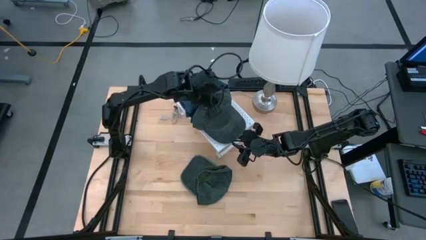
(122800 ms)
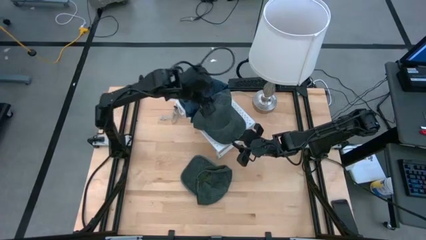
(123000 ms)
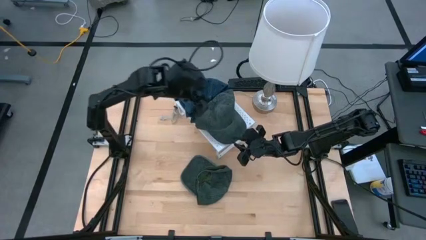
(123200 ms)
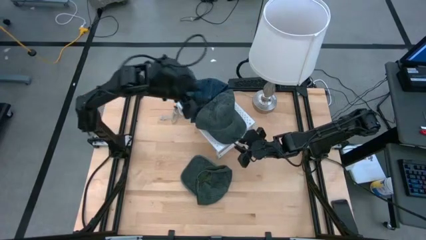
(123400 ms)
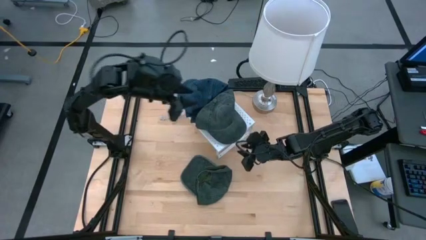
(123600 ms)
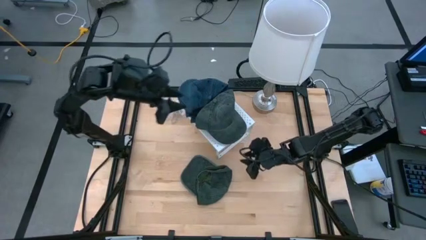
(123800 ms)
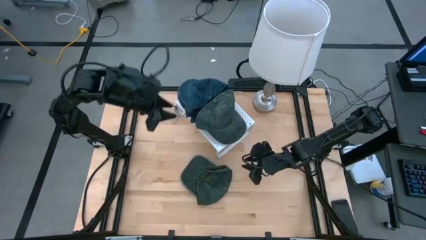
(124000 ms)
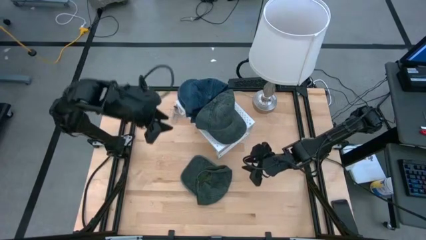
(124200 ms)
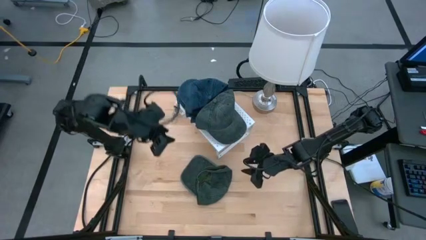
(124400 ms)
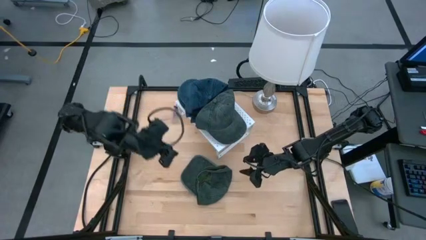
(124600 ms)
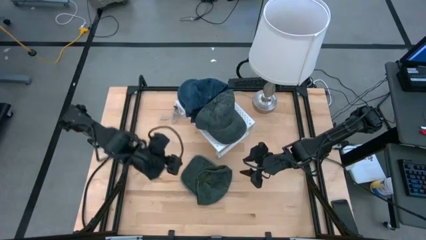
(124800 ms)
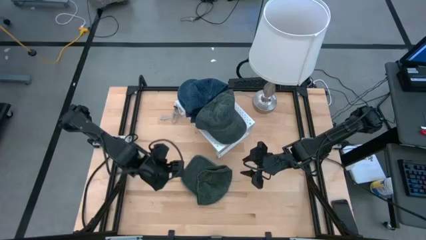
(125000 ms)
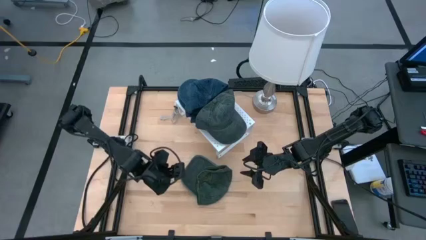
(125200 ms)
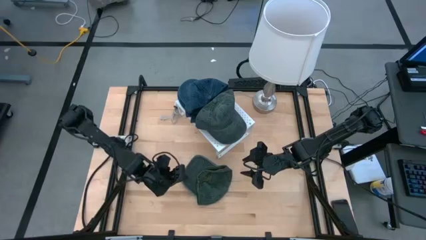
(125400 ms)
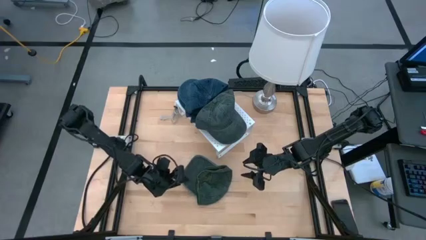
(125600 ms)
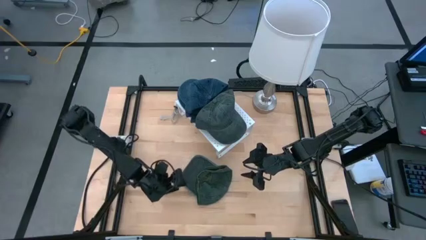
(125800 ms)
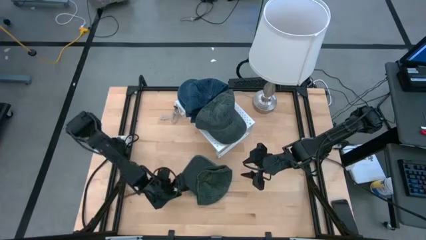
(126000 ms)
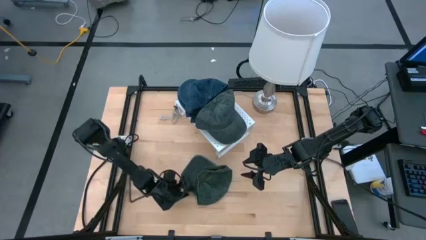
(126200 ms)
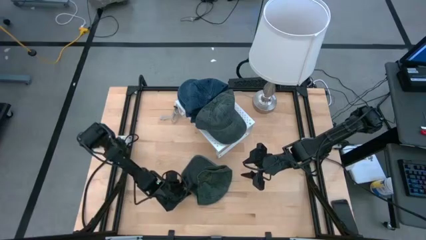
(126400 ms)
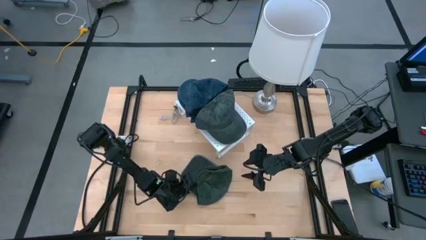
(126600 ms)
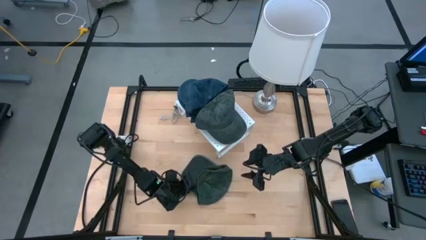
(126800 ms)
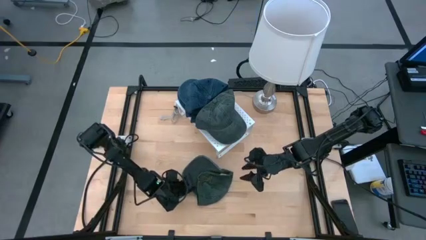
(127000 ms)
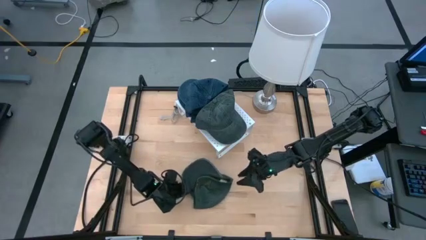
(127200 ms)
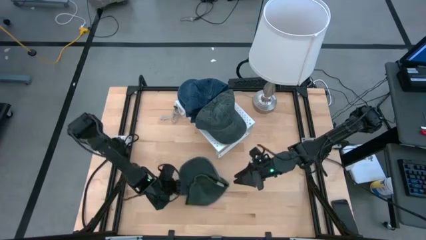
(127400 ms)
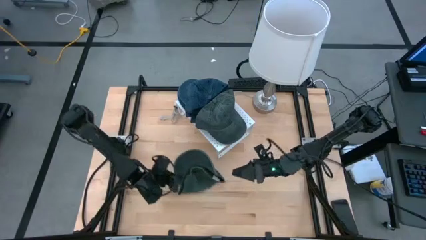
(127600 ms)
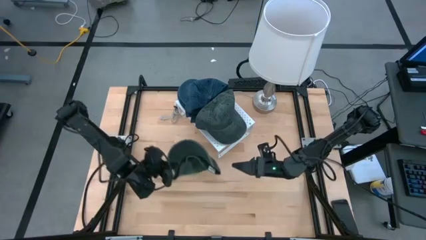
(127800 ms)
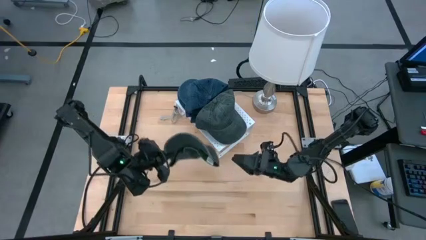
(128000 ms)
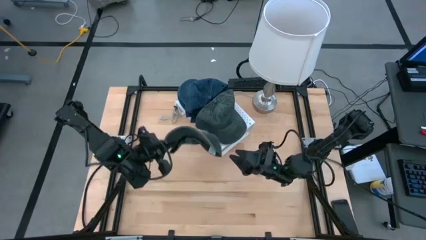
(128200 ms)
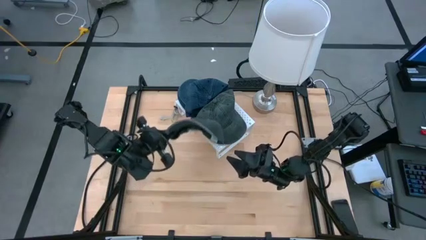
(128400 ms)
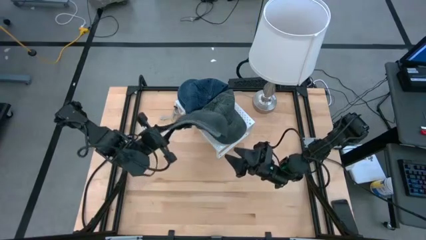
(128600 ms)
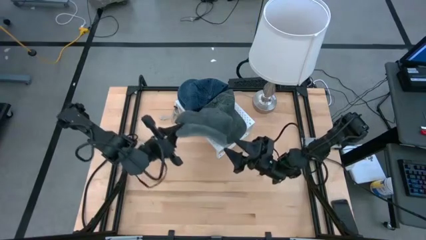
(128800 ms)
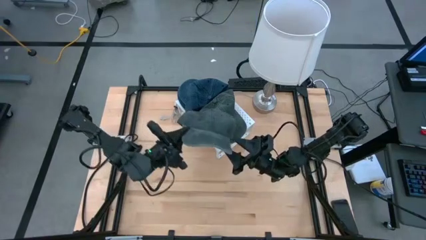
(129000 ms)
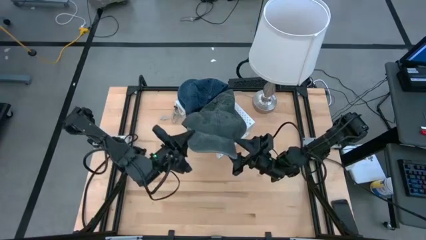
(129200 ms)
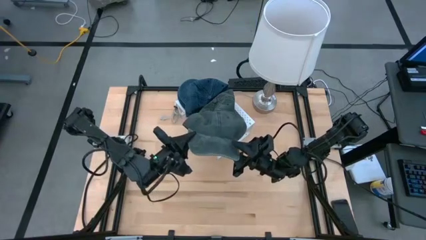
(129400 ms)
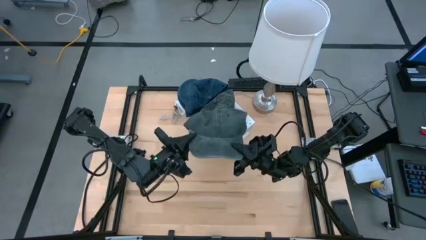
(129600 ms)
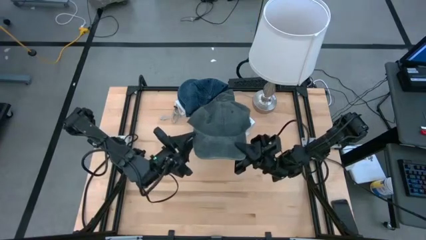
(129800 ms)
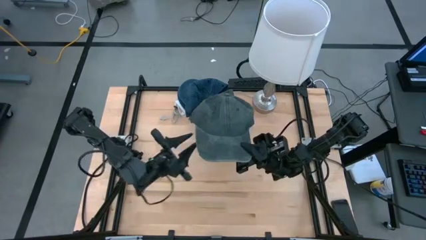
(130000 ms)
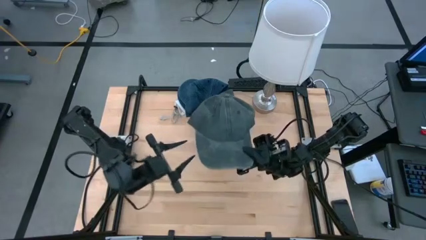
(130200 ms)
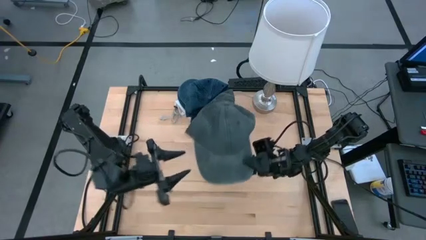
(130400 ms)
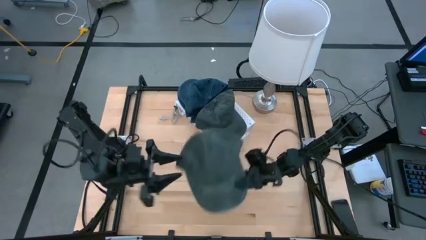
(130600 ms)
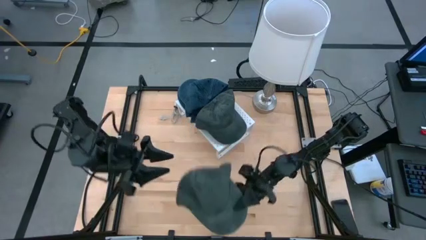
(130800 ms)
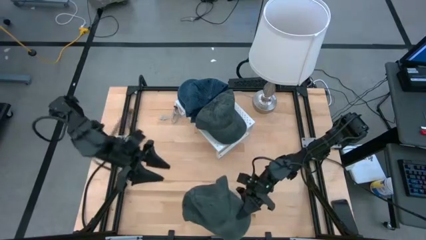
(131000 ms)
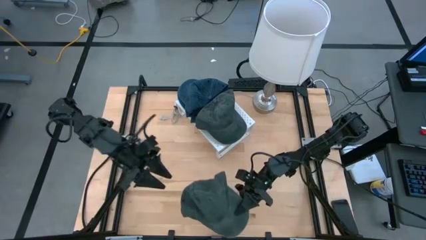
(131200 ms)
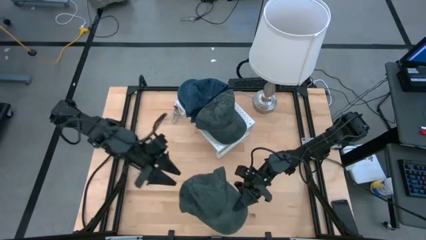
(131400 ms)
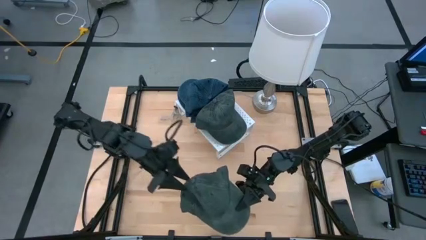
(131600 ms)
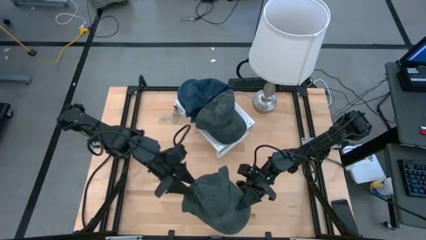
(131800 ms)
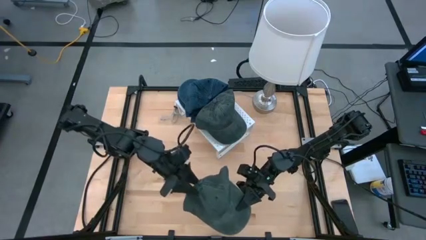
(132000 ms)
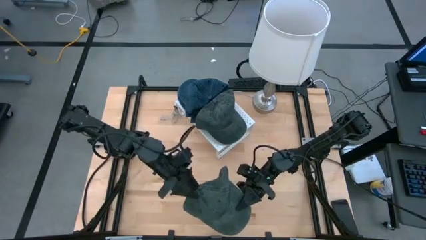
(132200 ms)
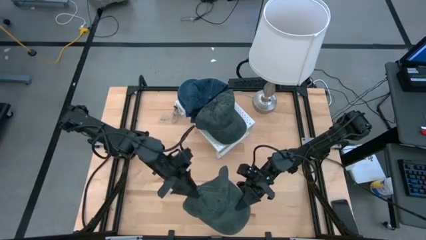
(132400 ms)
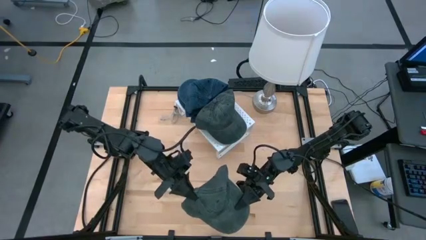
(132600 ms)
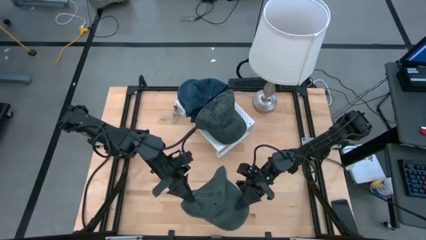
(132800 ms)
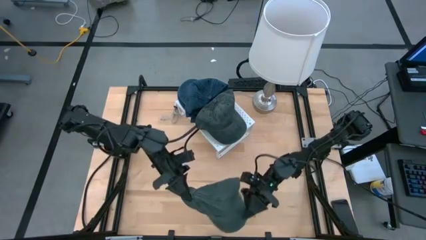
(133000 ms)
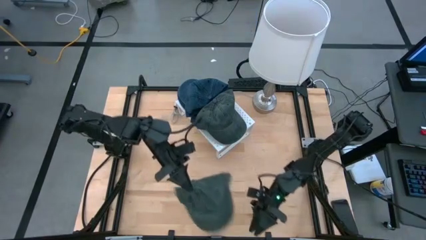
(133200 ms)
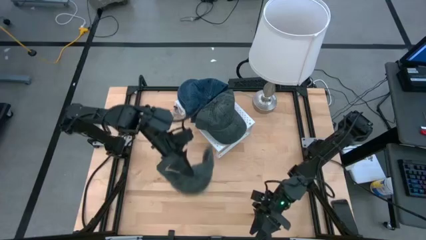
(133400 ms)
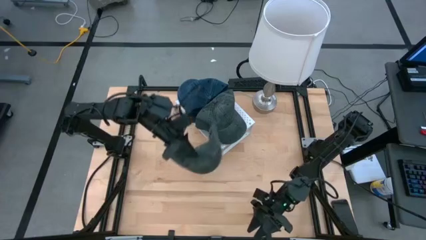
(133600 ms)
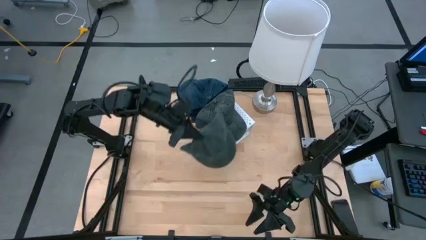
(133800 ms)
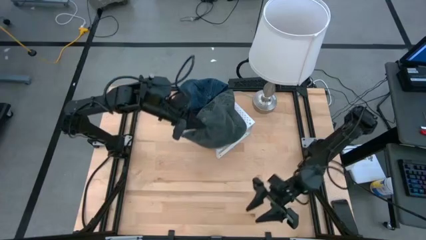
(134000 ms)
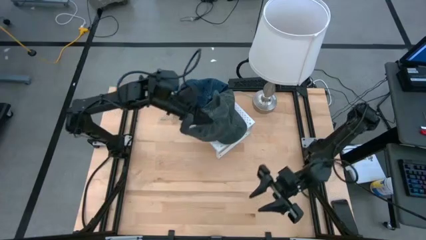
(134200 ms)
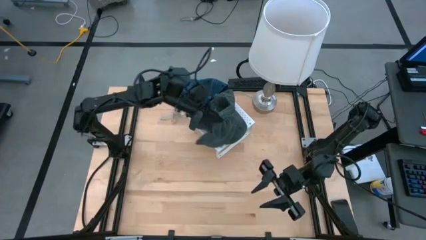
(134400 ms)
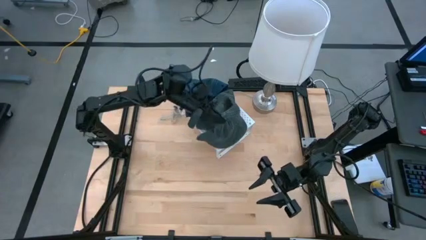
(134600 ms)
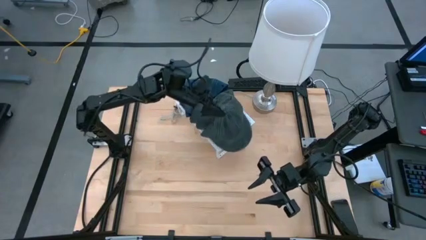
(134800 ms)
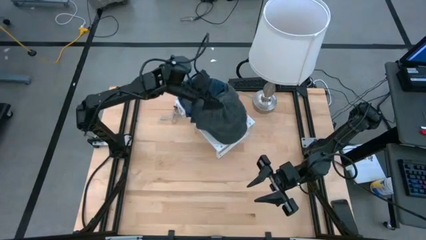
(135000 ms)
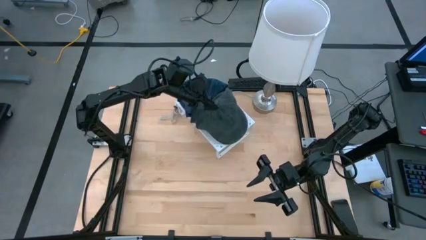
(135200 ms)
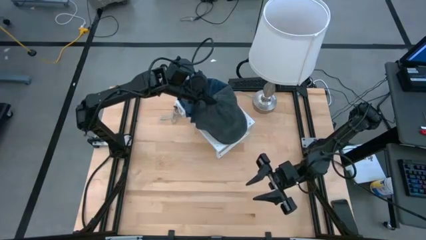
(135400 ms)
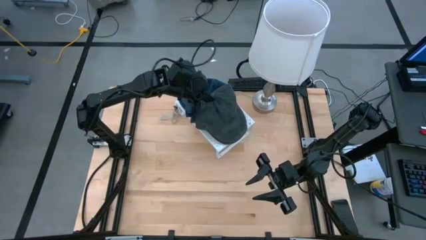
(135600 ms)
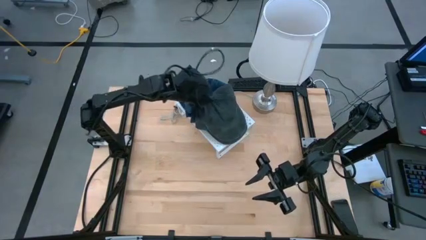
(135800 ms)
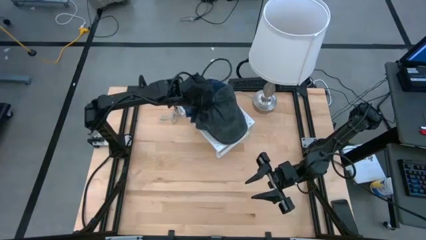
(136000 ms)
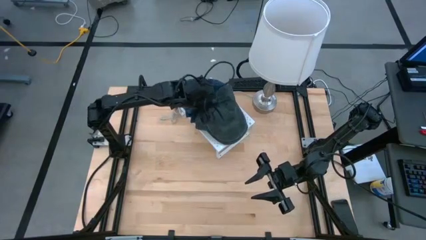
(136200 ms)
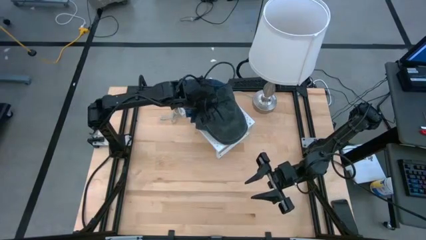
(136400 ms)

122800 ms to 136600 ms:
Task: Pick & Place hat
Stack the gray cap on the stacked gray cap on the shelf

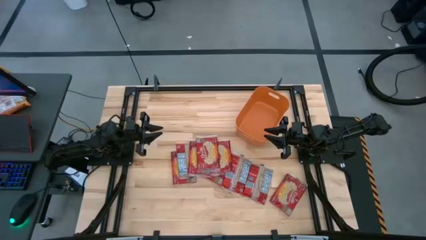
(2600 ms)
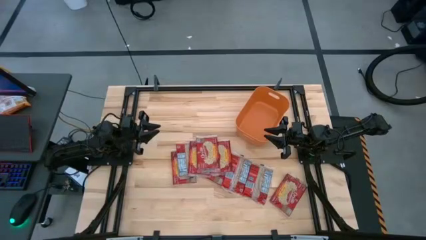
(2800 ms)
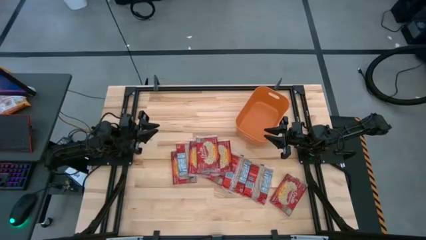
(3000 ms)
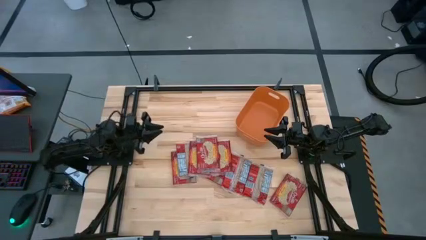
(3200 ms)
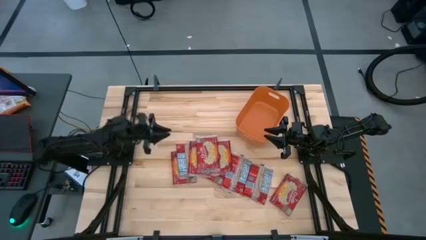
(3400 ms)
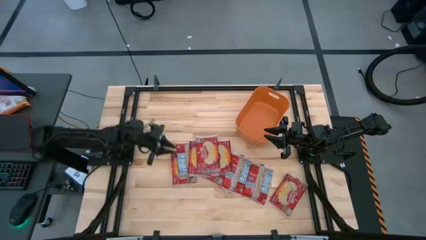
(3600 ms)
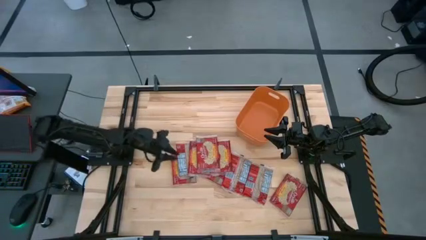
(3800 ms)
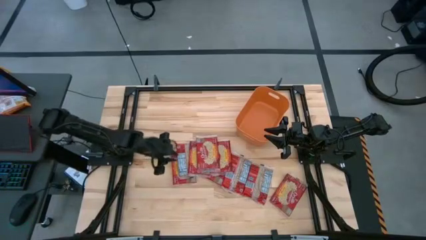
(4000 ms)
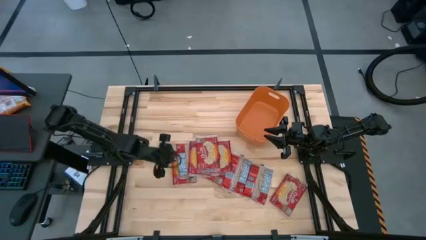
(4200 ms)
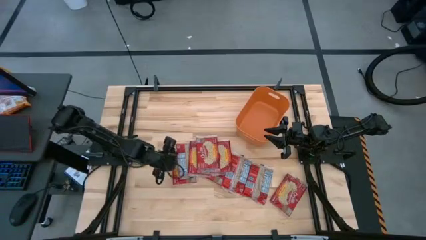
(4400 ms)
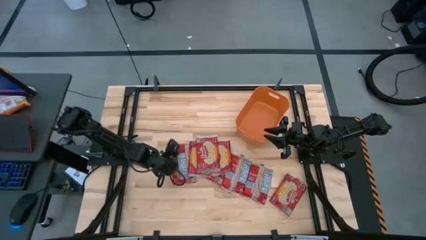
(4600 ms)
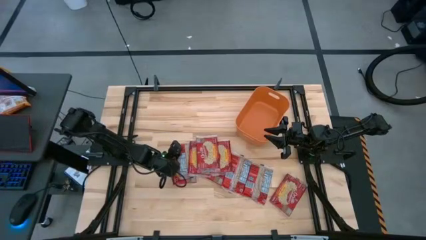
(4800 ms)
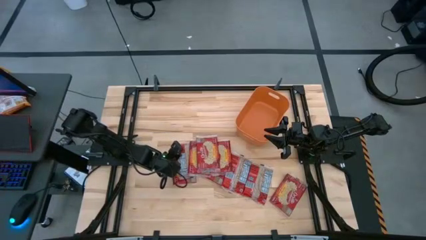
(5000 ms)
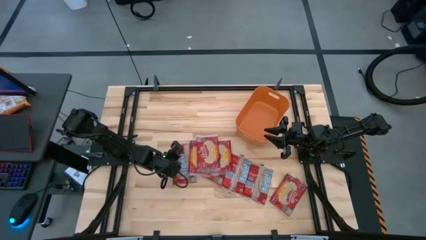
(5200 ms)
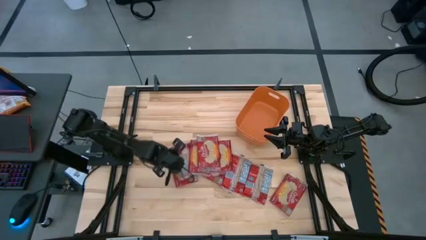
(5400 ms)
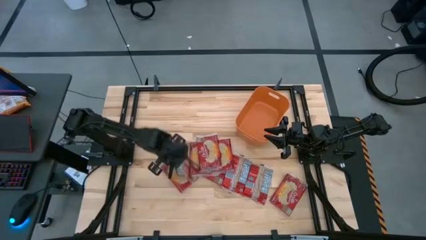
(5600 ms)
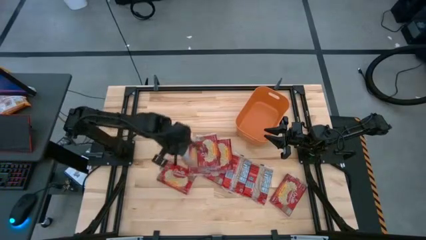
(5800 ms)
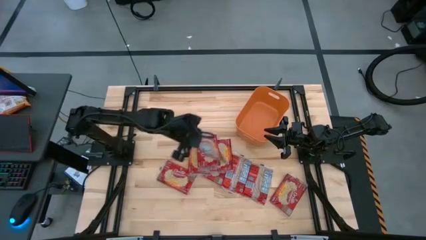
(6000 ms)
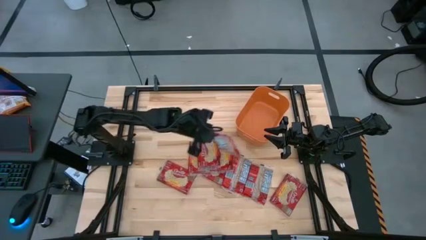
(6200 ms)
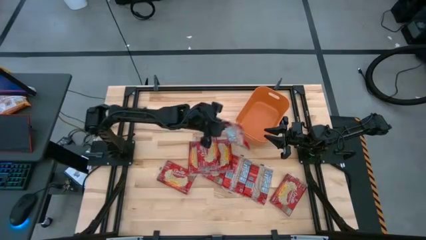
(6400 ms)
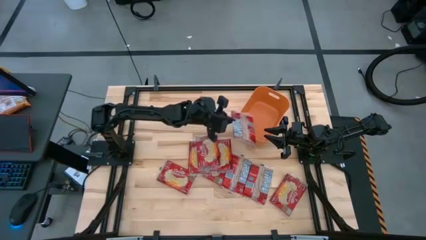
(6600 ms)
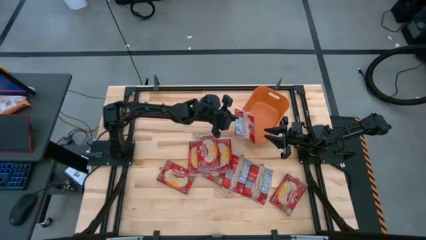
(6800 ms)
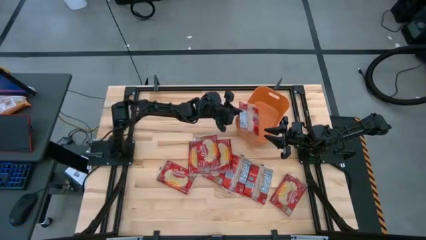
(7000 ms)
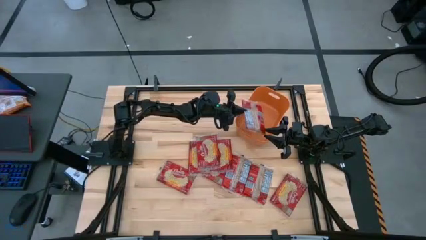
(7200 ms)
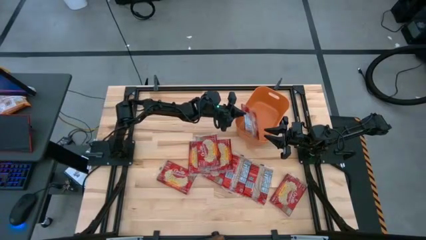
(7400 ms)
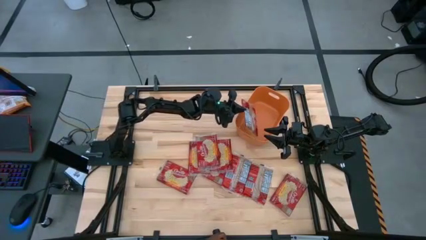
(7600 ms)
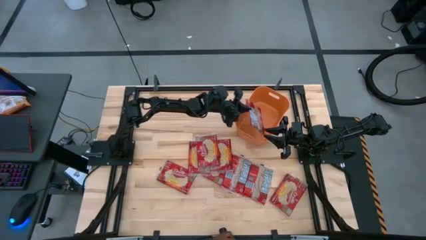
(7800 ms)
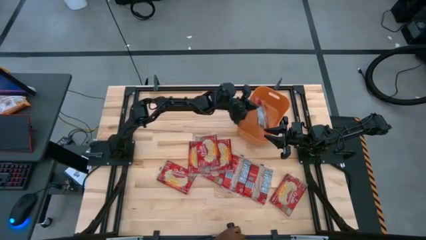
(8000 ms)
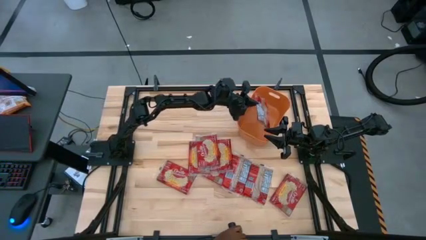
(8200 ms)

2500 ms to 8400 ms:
Task: Sort popcorn bags into baskets
Put the red popcorn bag into the orange bin
